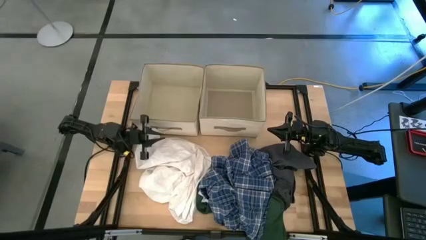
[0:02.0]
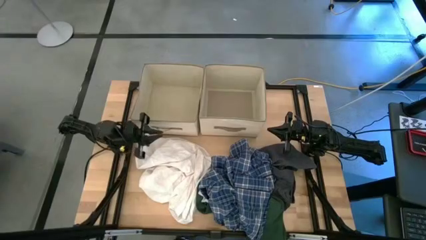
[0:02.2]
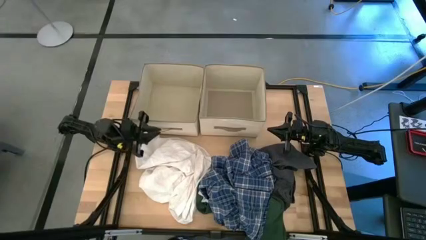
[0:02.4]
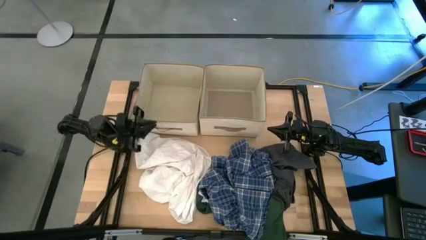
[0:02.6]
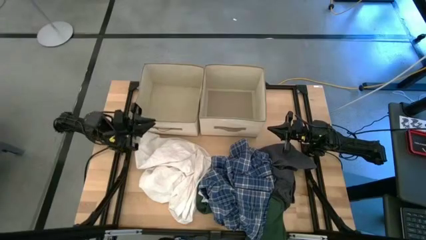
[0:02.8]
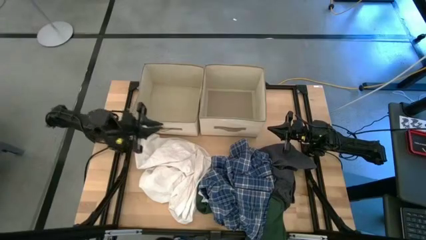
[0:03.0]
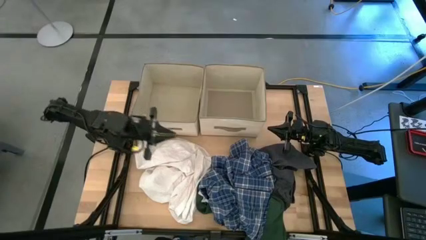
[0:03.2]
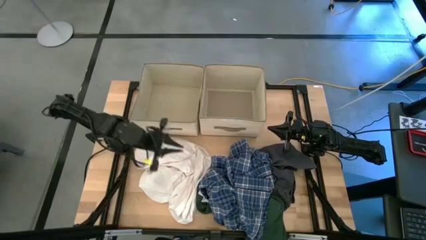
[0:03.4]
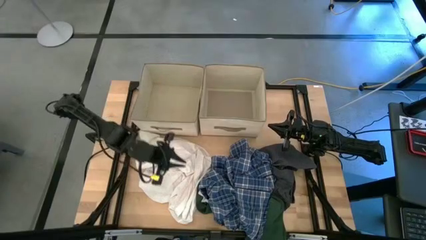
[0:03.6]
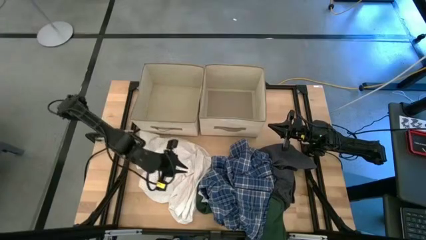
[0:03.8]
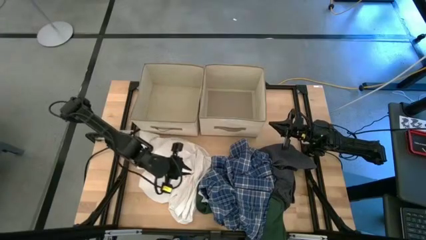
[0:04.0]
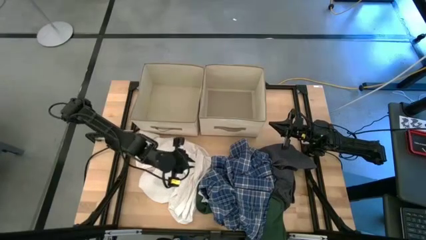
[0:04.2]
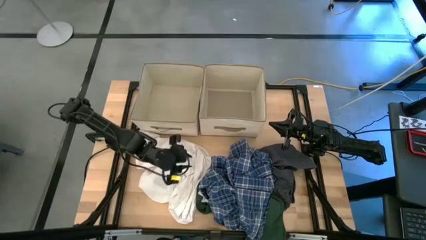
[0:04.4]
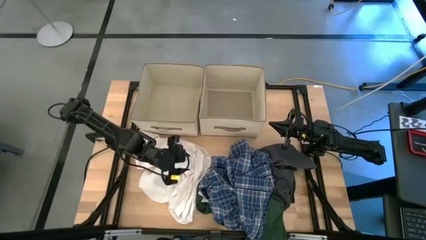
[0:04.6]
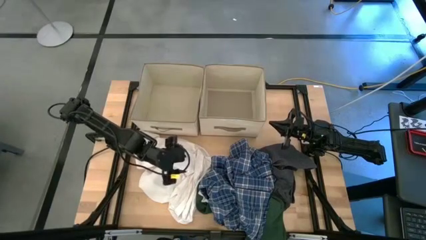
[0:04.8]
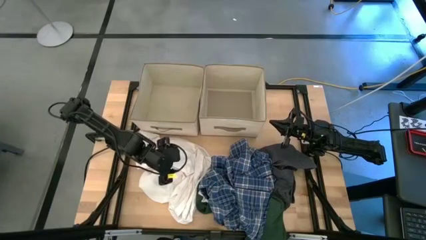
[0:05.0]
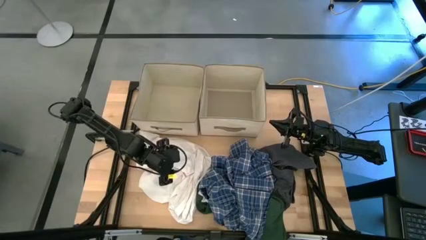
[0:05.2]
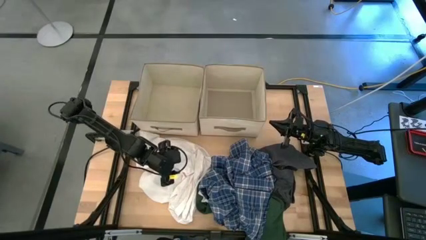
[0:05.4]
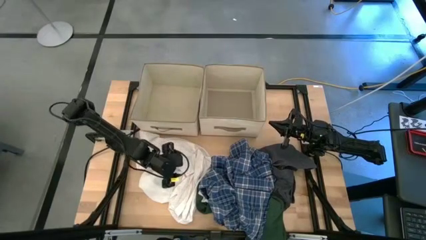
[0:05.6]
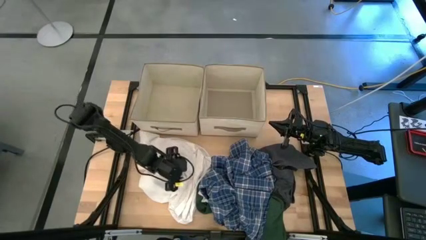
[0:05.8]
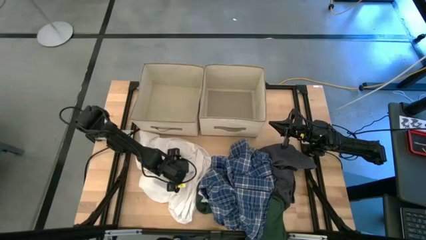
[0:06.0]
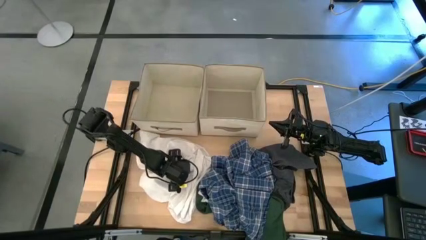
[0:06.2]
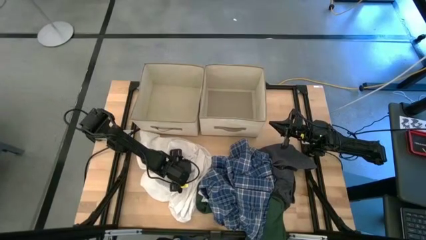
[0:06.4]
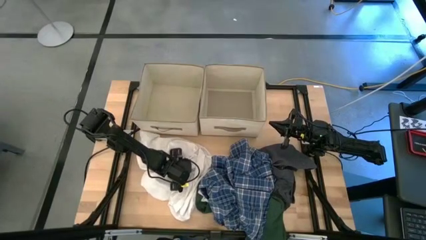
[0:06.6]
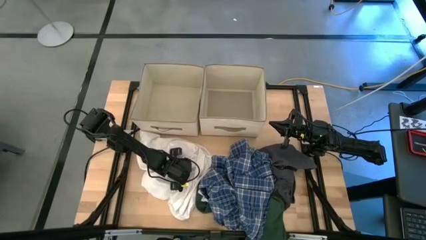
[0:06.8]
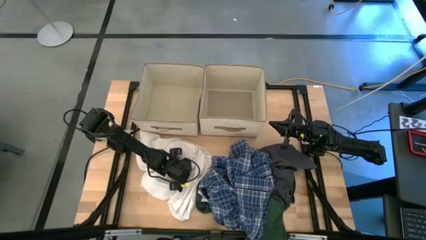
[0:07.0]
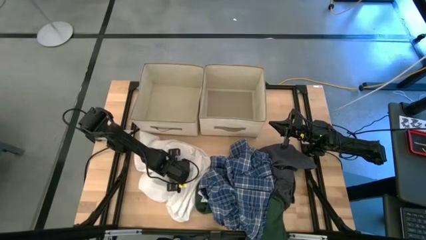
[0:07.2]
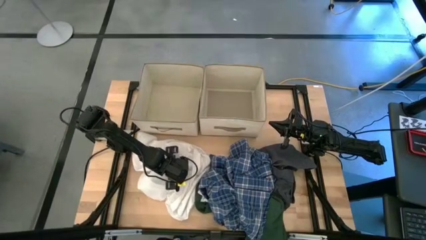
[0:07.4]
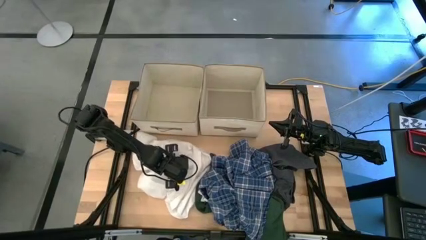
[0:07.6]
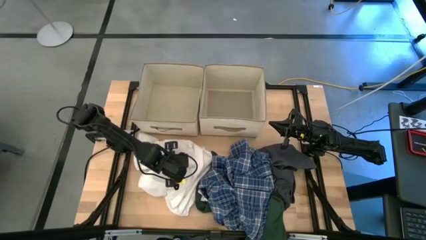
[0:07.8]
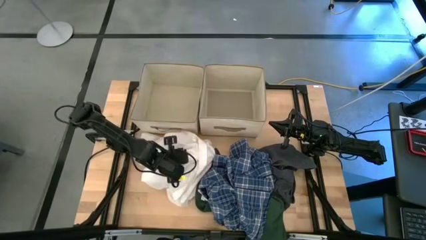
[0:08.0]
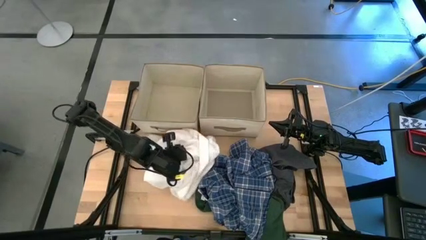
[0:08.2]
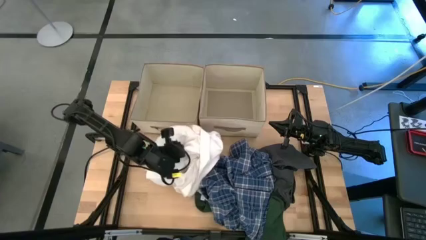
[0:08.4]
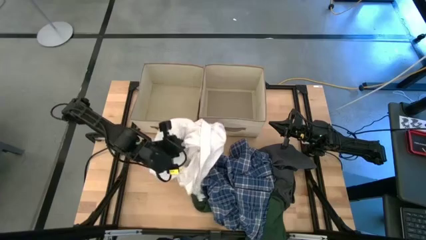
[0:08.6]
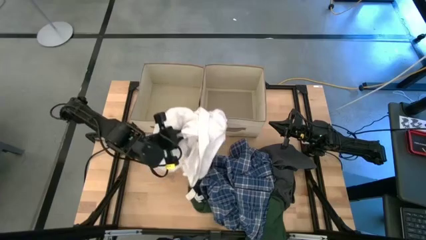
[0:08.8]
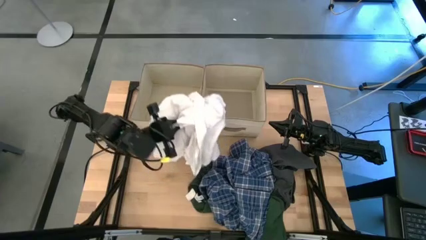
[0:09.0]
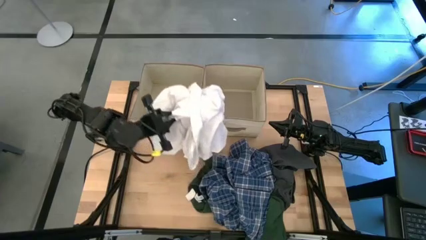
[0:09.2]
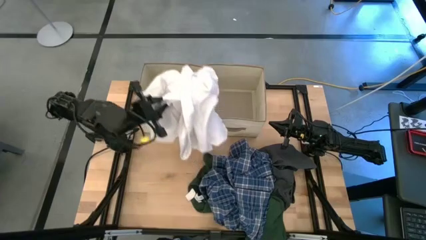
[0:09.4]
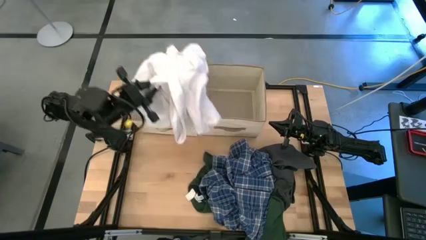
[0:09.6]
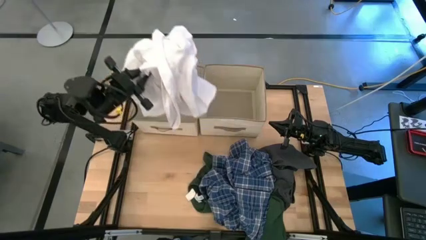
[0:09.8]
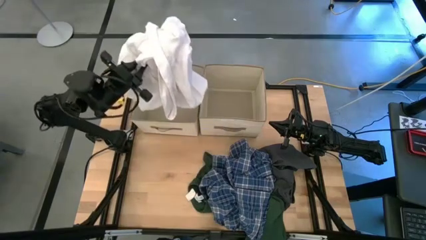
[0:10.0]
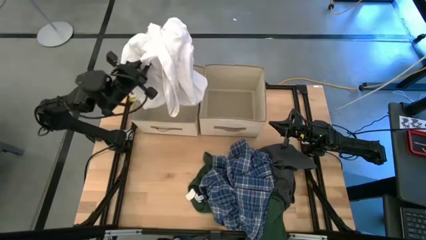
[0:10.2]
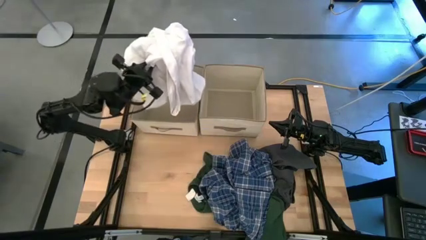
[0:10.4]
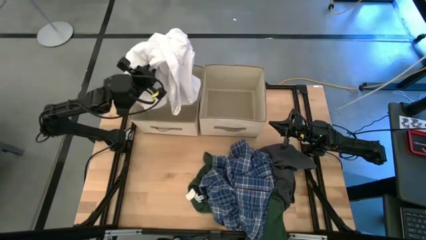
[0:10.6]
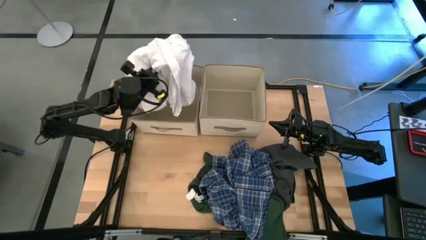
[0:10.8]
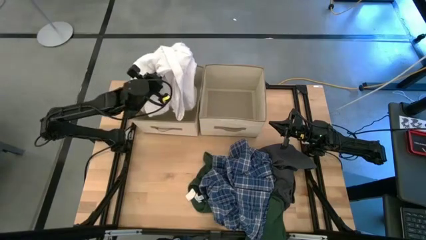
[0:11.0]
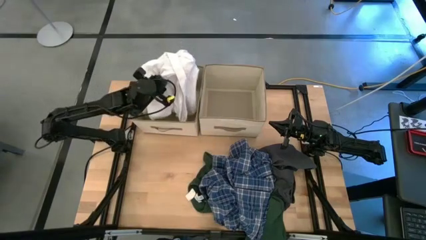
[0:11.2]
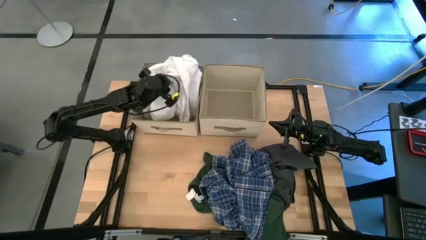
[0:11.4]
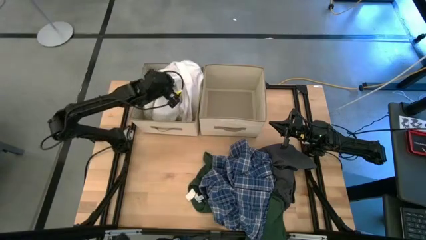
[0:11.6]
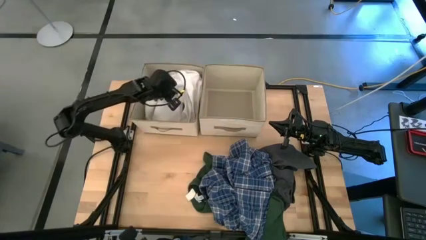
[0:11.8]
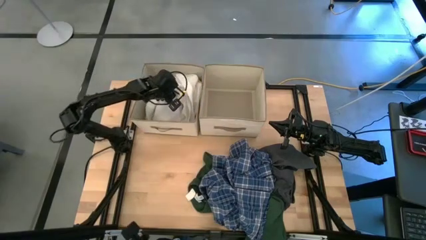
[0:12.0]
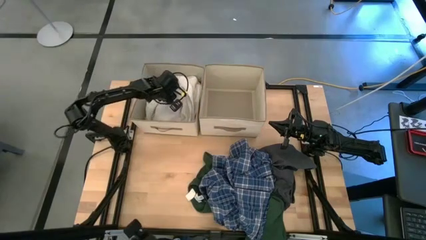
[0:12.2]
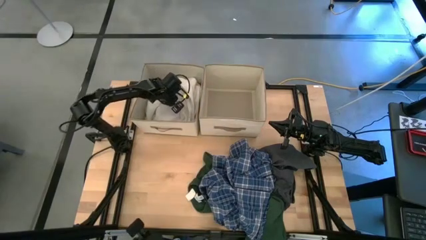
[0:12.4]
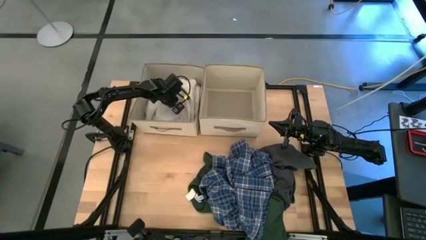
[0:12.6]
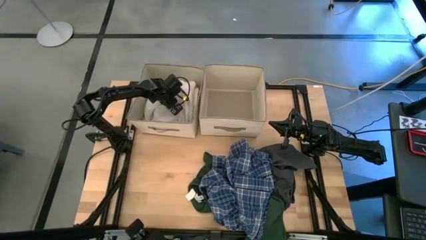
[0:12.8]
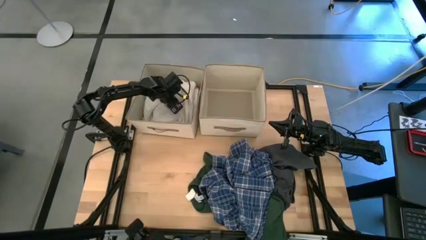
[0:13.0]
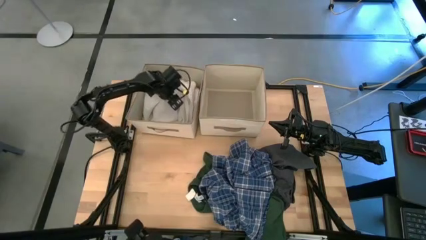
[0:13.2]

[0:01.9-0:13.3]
Task: Sort clothes
Put the white polo shirt into the left laundry organizer
